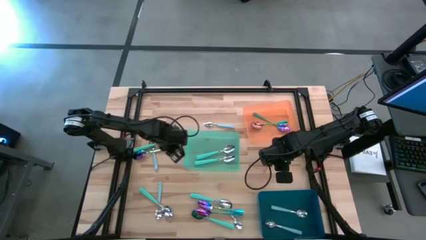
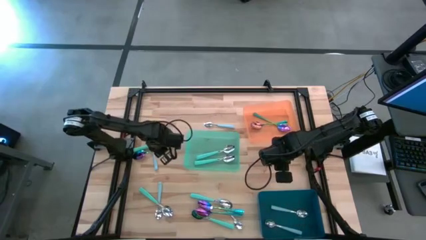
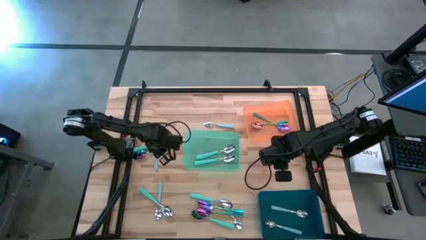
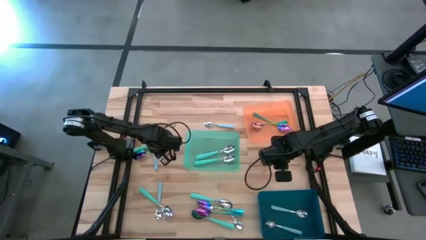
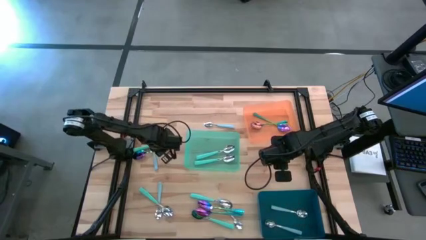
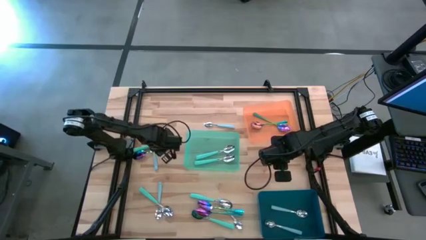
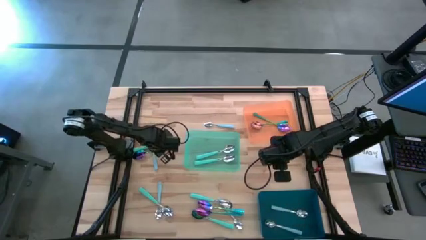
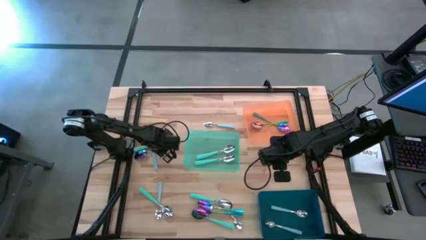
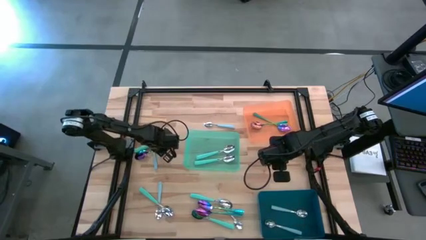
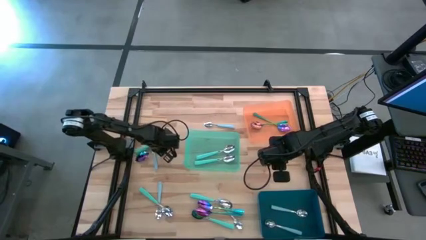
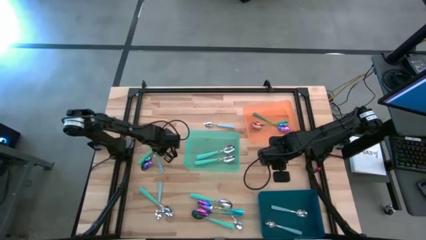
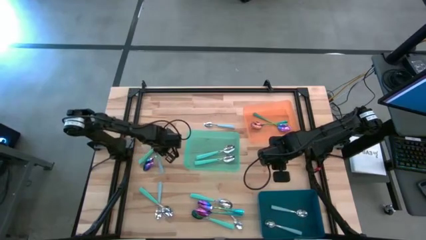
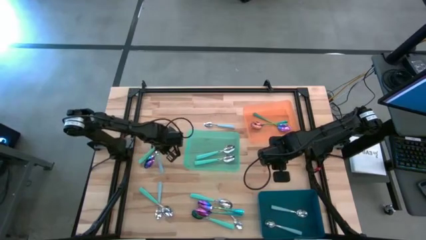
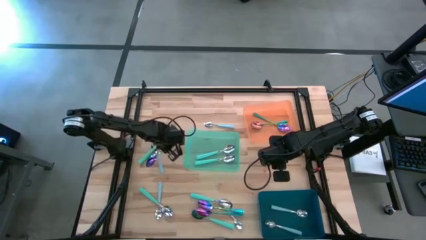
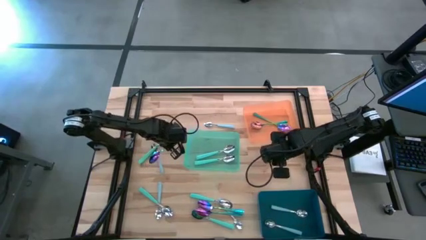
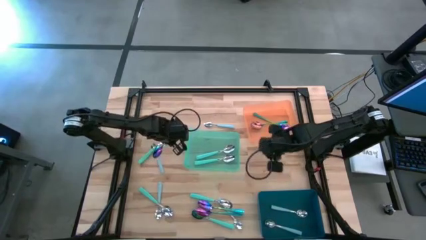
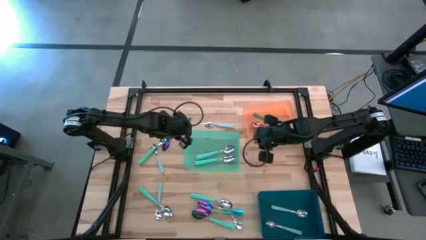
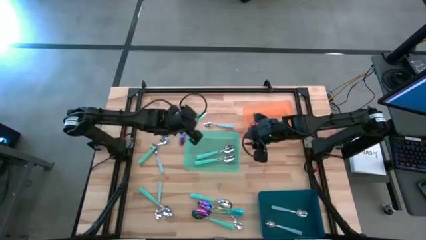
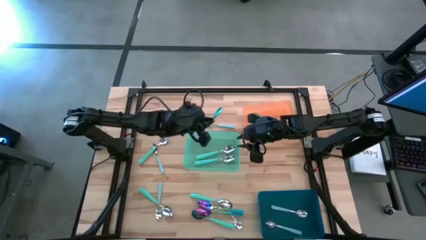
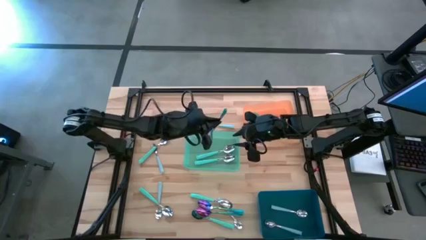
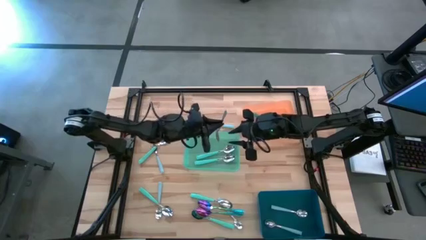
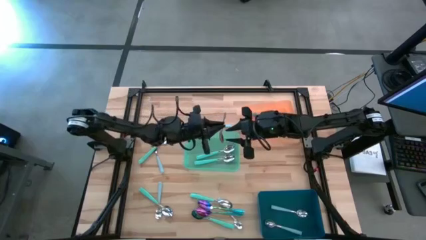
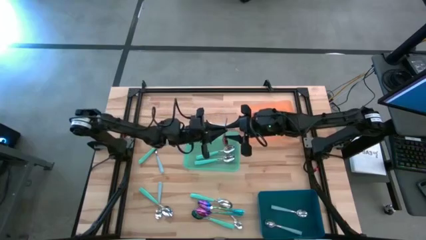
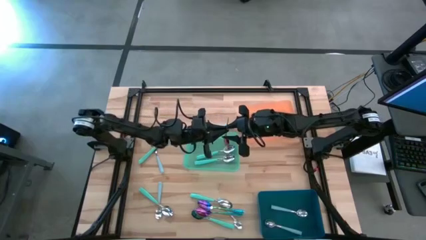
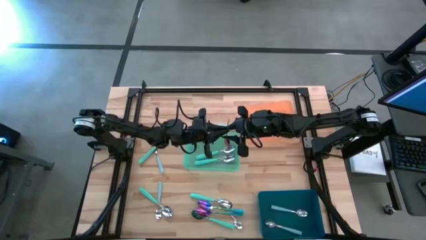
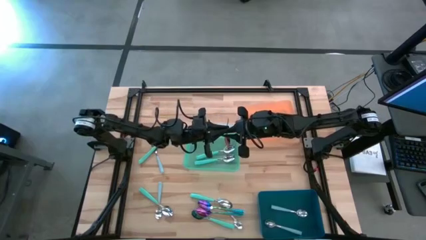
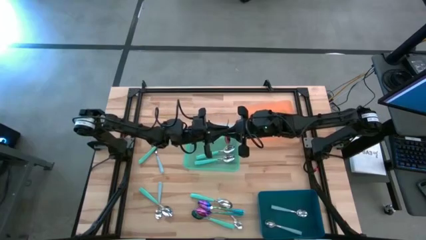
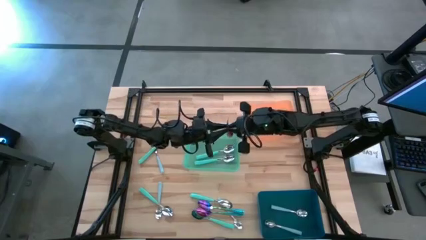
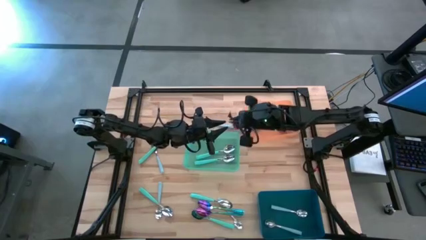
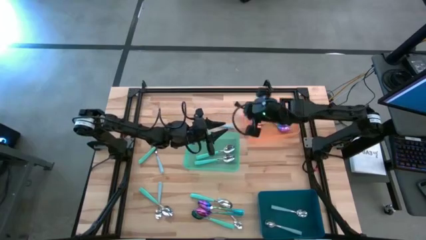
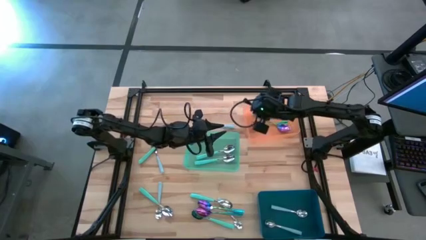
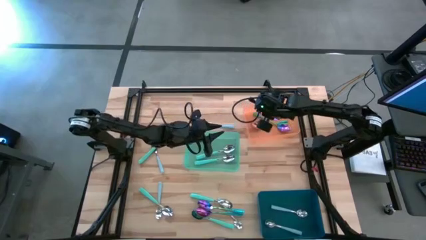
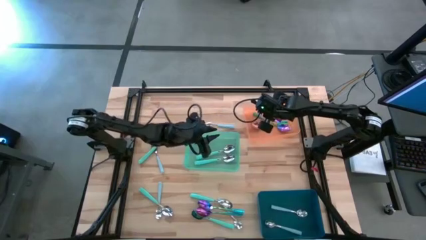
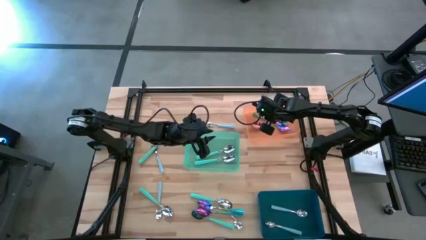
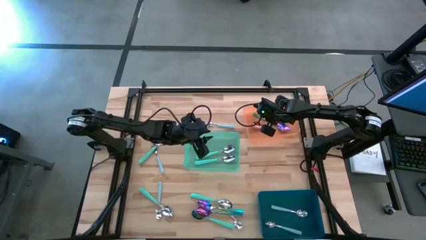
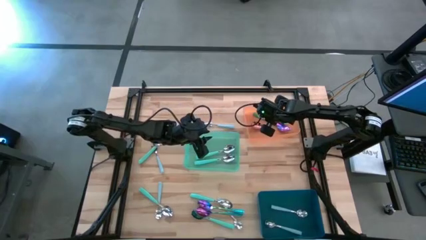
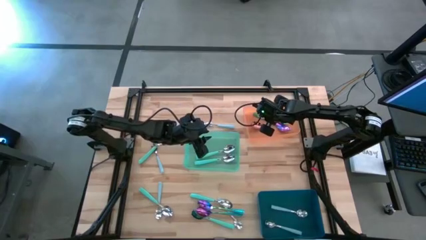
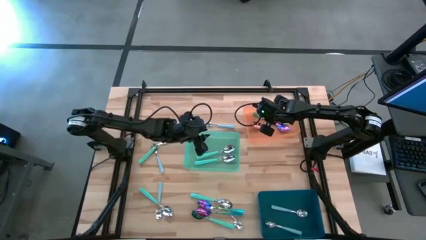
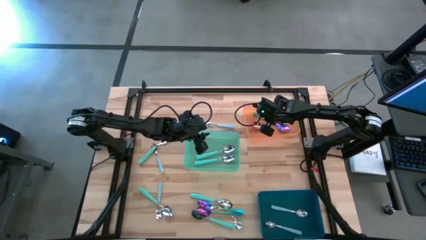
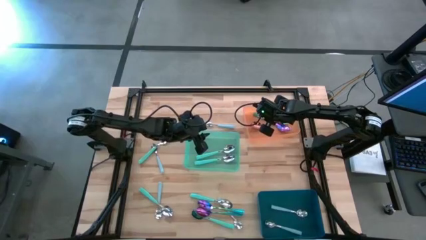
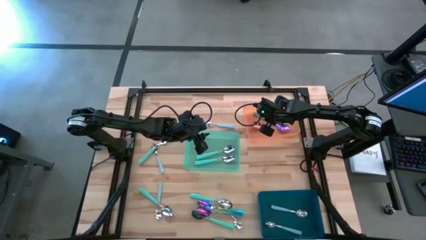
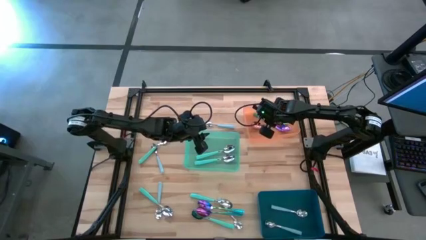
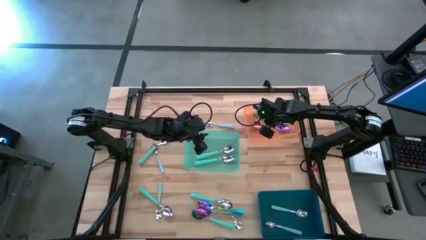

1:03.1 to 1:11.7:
Task: Sort silverware by color (type)
Put the violet spoon into the orange bin

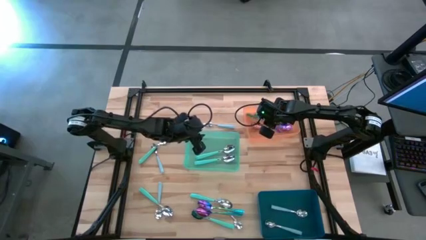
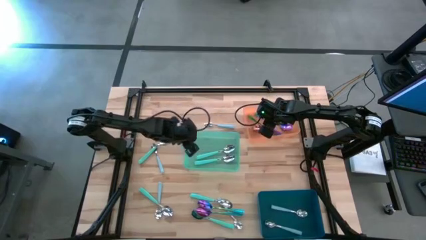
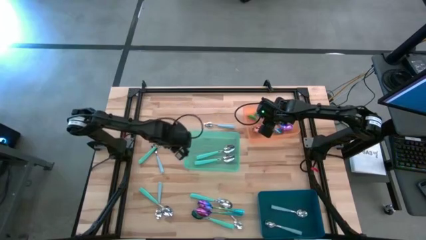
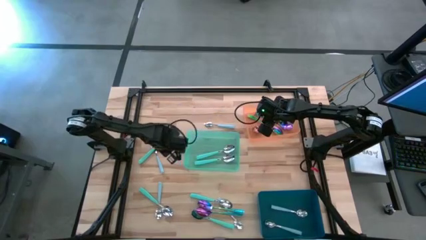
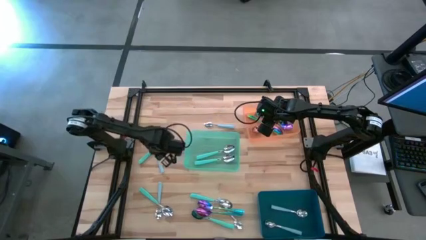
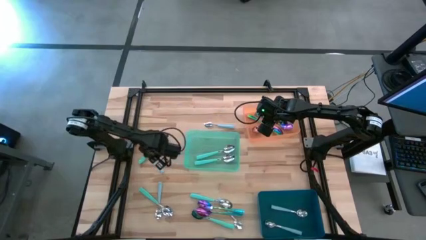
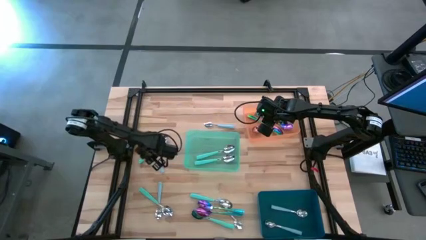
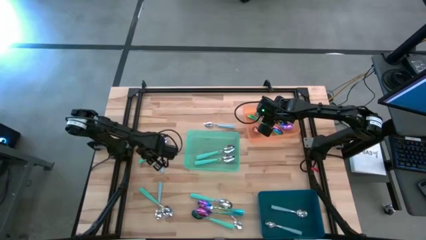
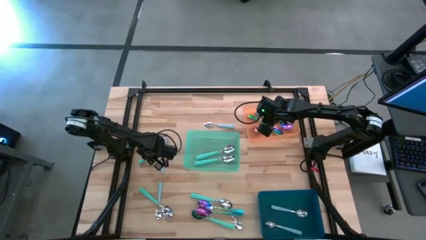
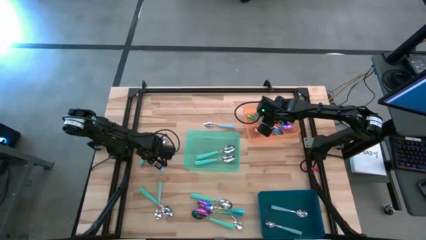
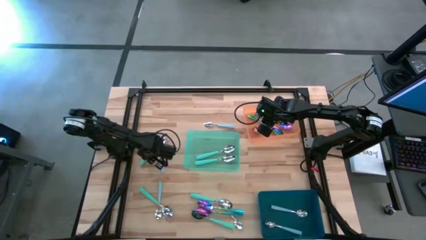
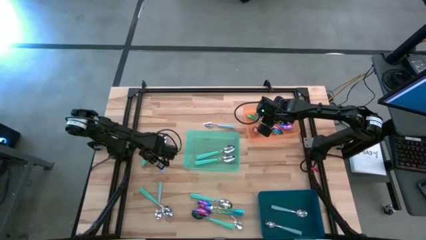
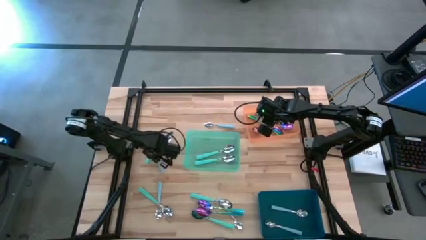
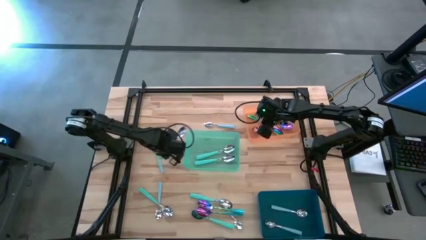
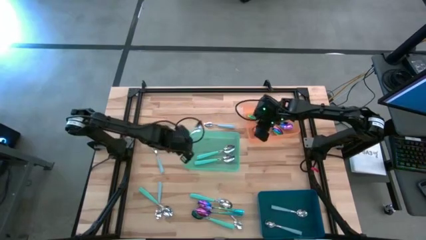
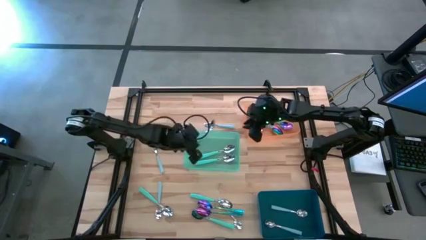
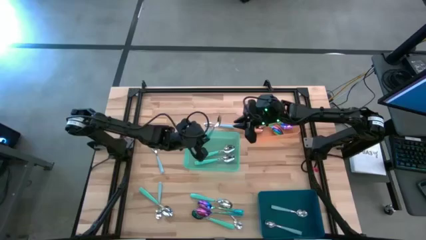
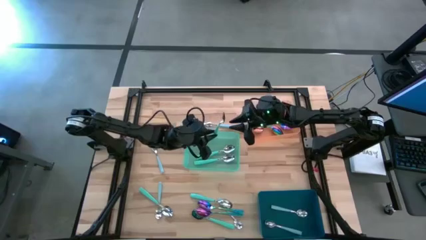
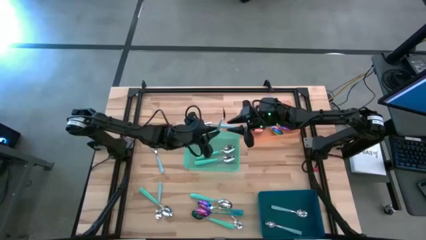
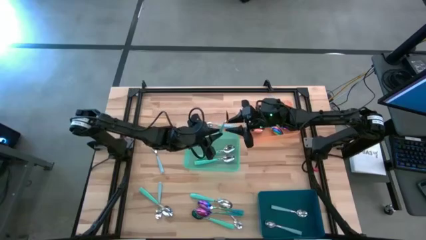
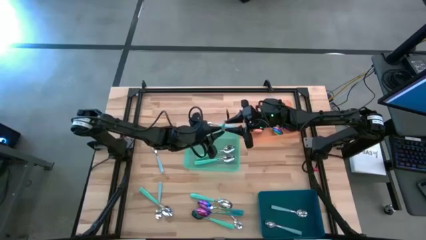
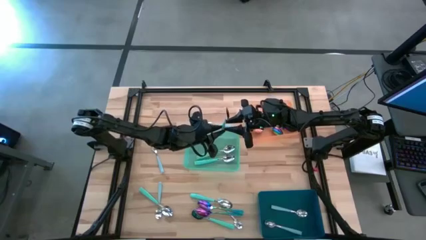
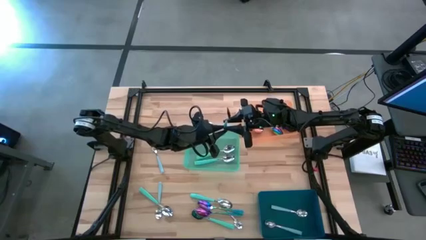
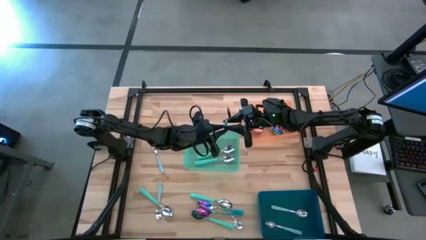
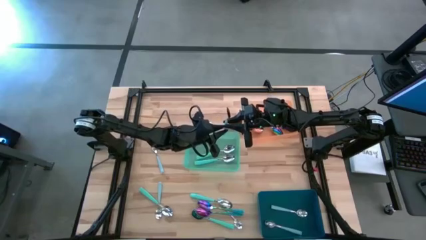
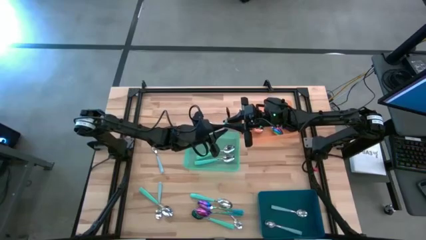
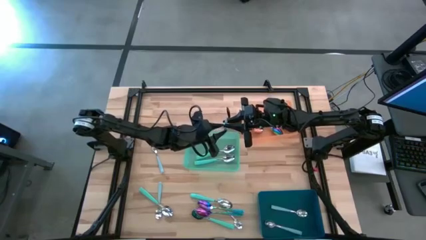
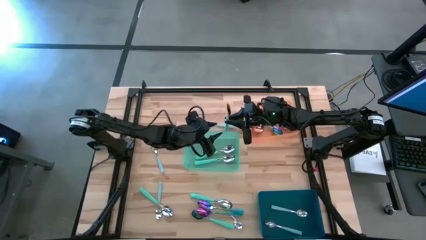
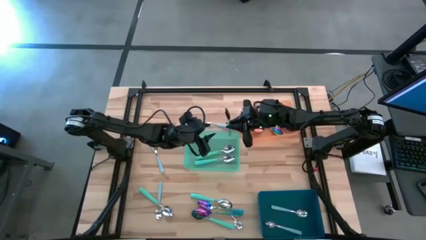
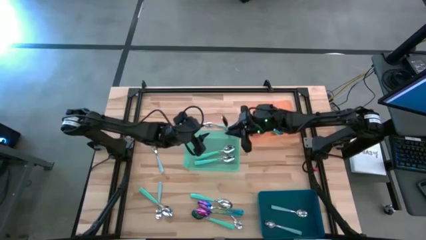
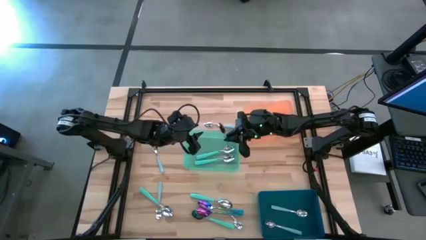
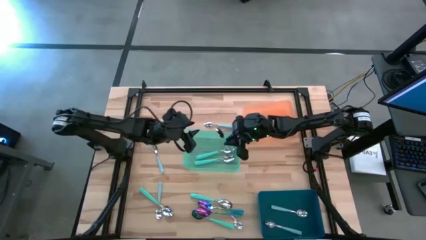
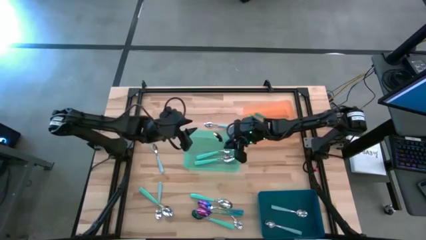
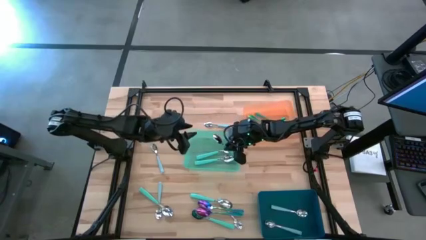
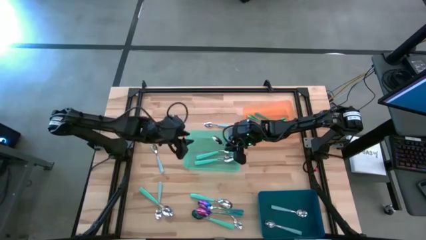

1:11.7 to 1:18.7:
Put the green spoon into the green bin

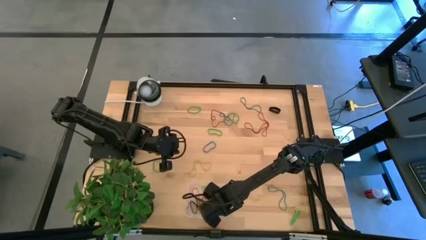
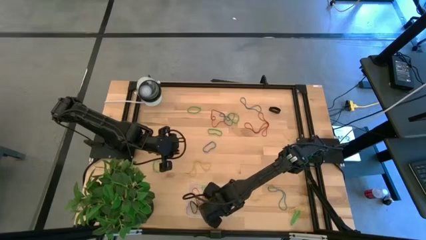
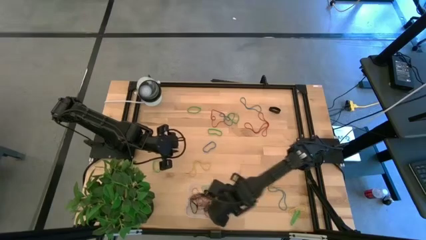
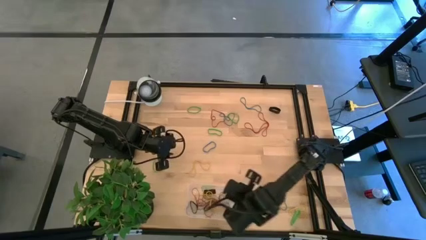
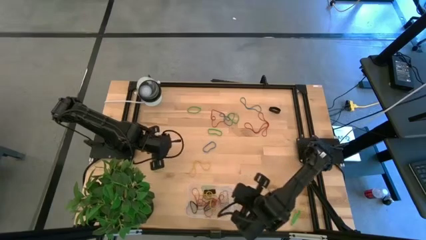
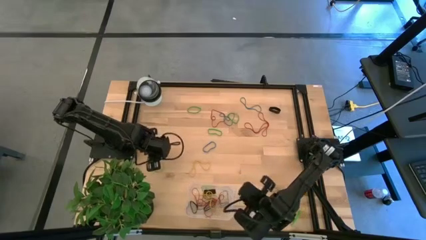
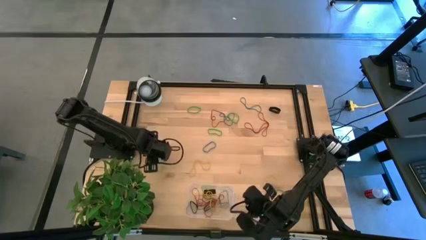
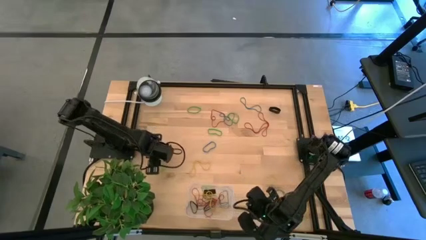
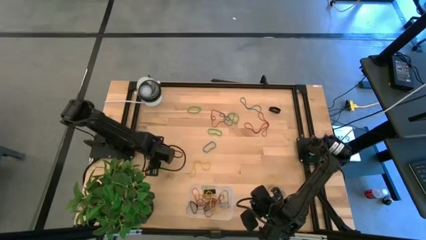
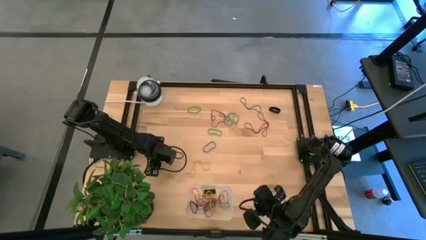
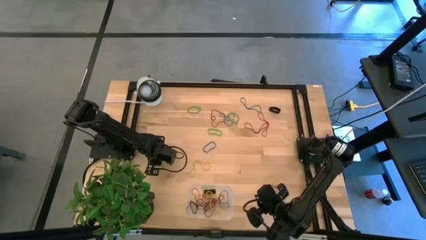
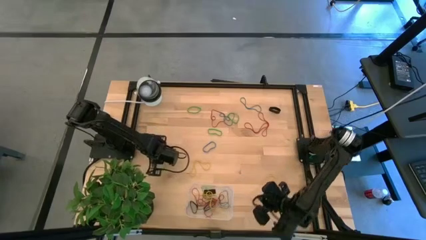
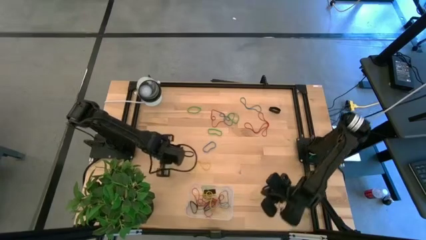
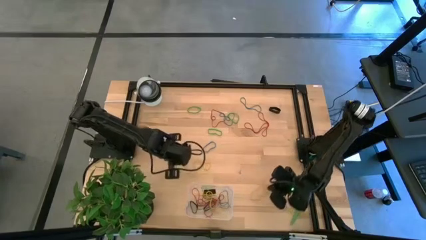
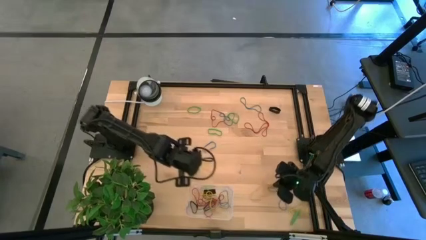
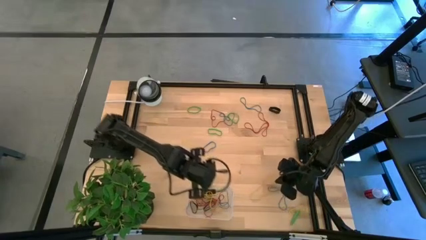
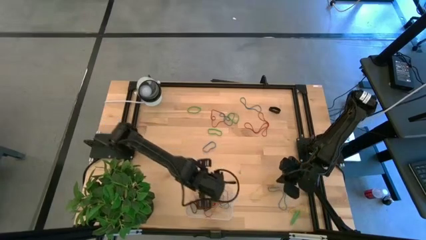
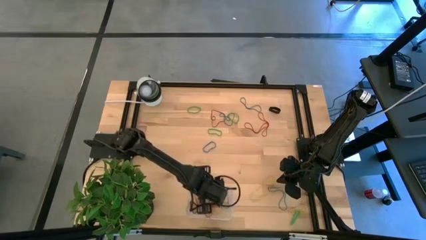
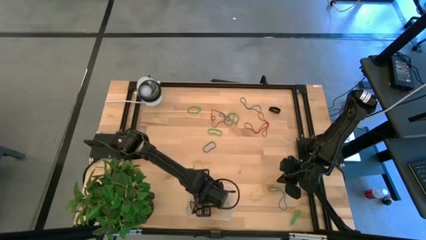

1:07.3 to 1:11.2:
Task: Pick and place rubber bands into bin
Put the green rubber band into the transparent bin
